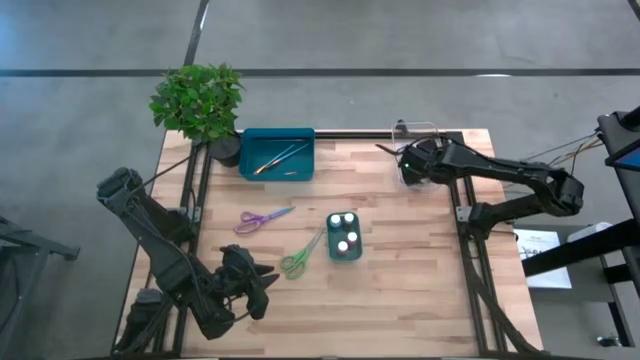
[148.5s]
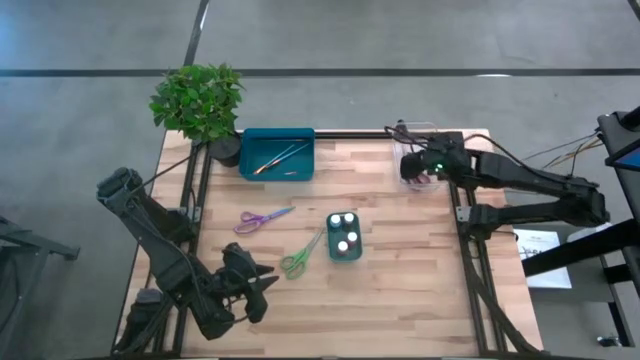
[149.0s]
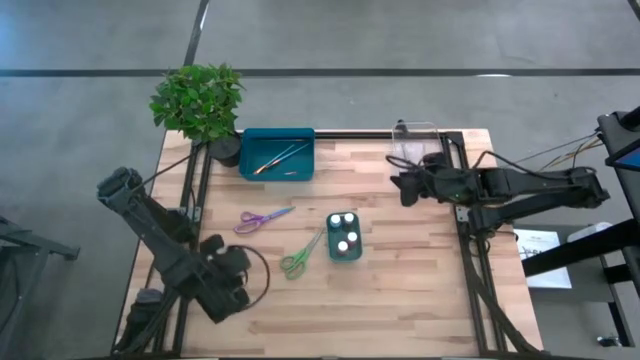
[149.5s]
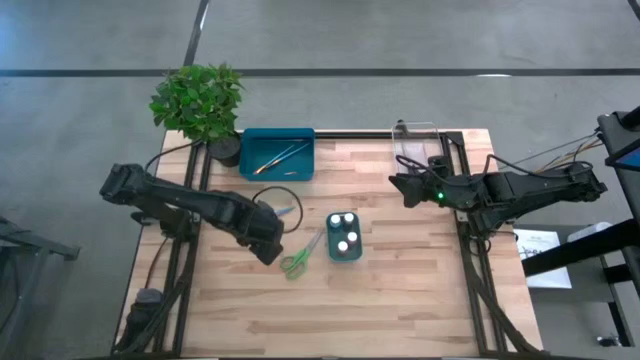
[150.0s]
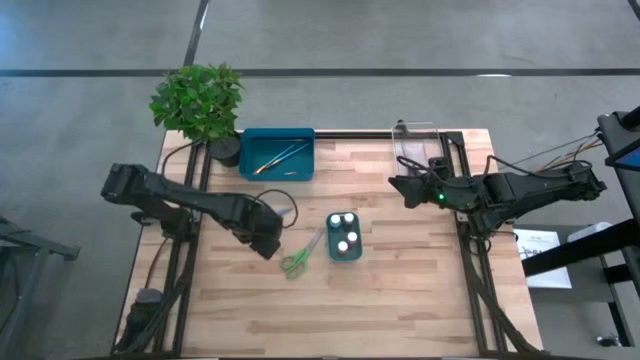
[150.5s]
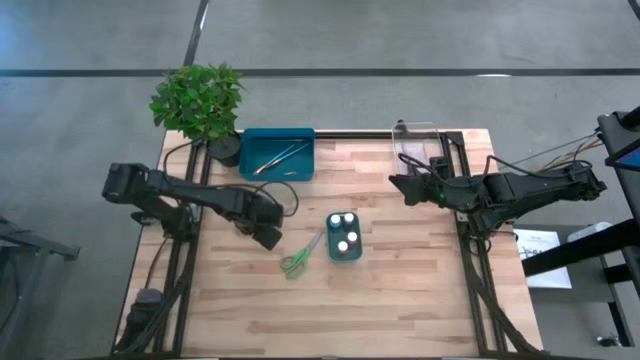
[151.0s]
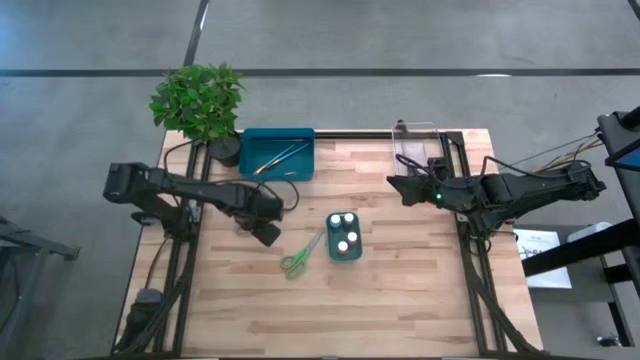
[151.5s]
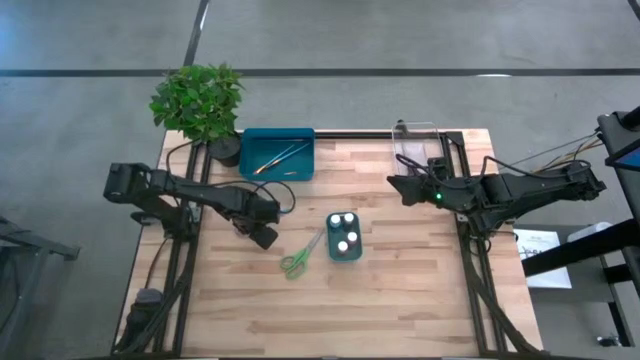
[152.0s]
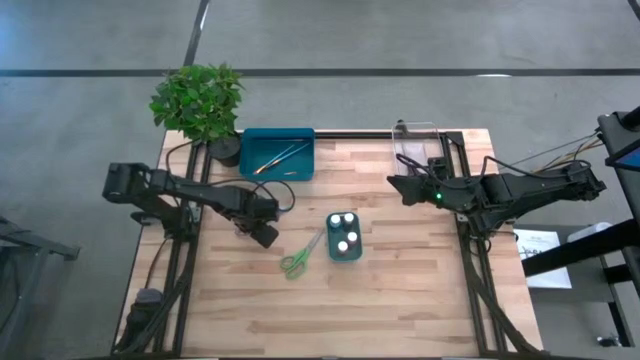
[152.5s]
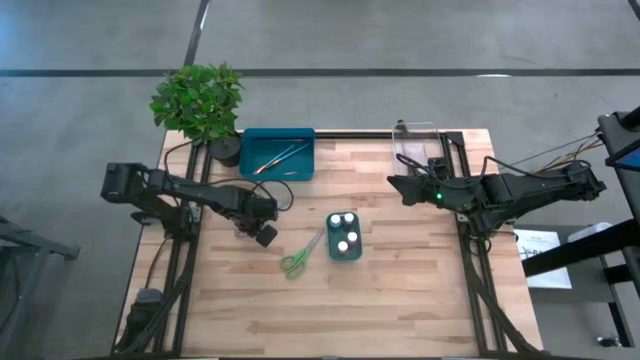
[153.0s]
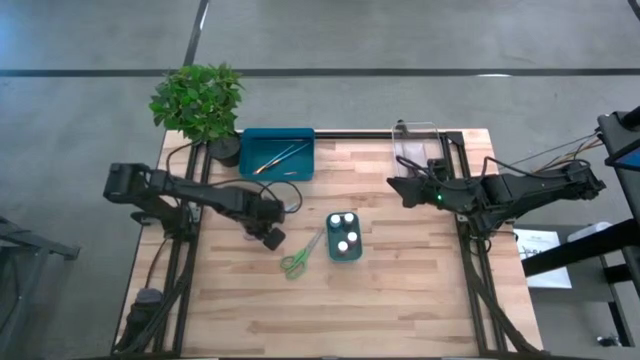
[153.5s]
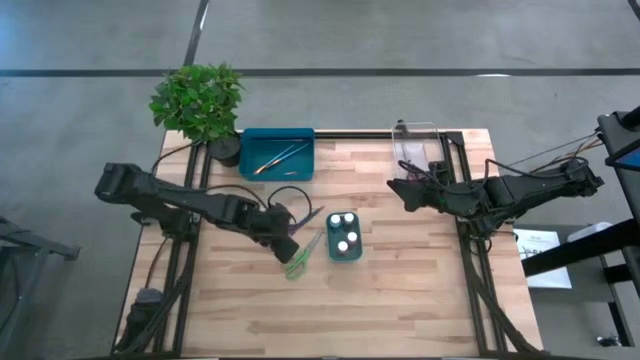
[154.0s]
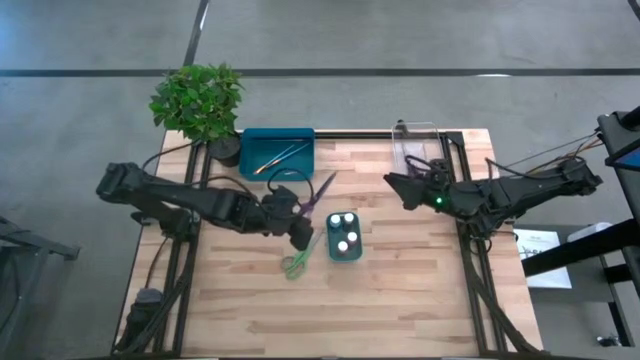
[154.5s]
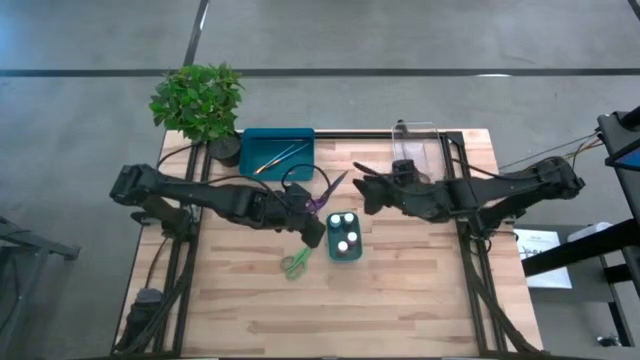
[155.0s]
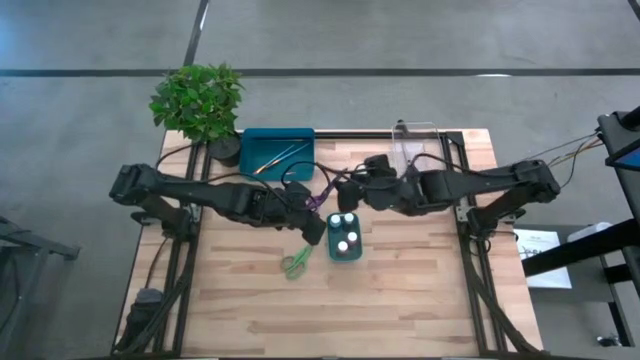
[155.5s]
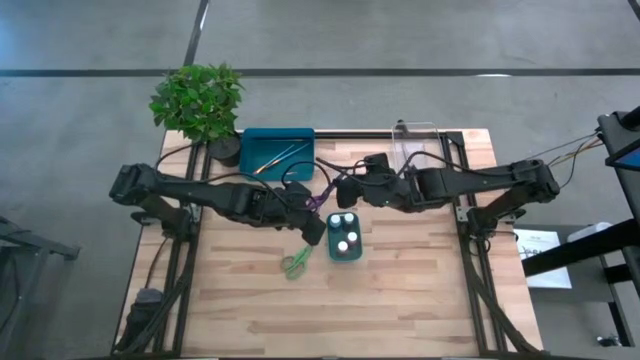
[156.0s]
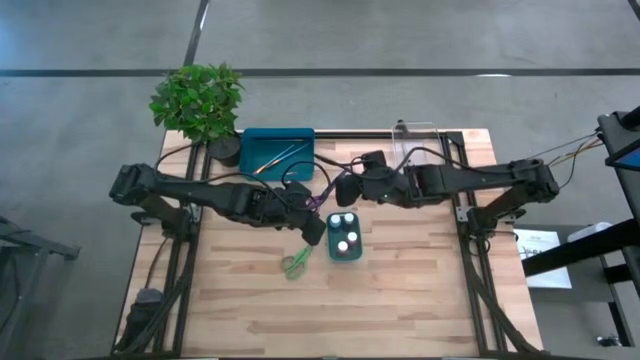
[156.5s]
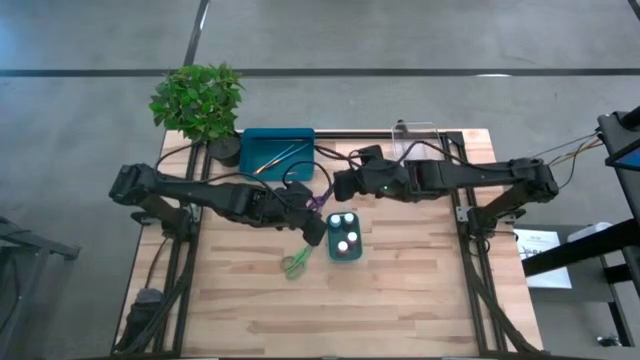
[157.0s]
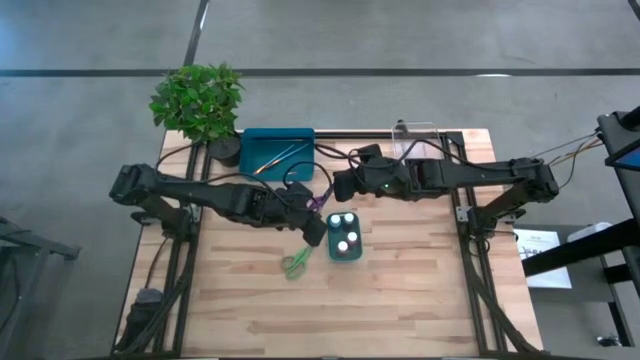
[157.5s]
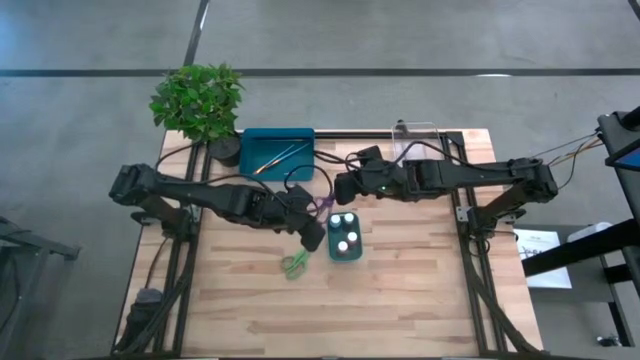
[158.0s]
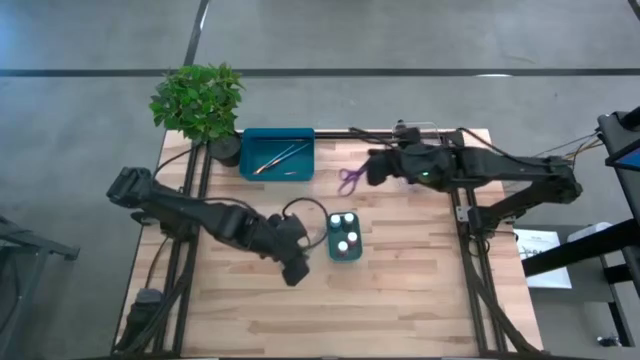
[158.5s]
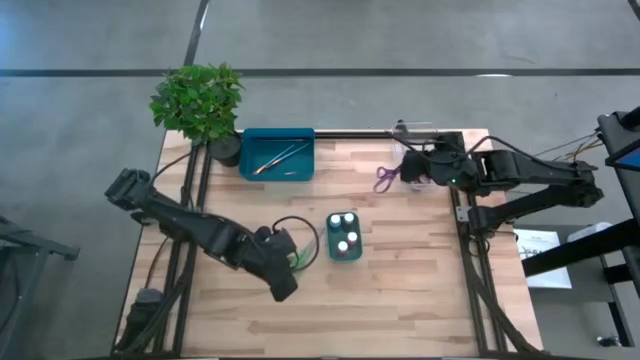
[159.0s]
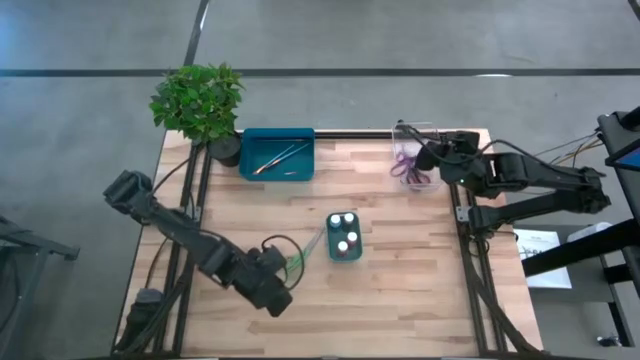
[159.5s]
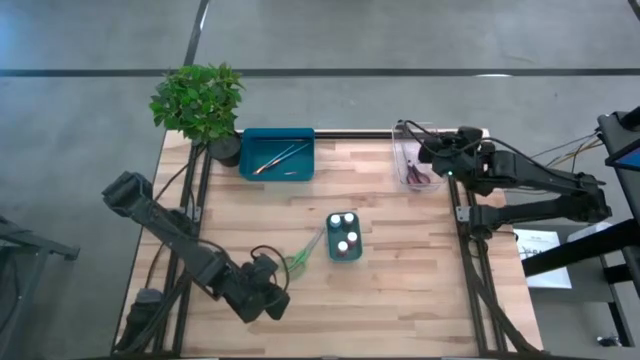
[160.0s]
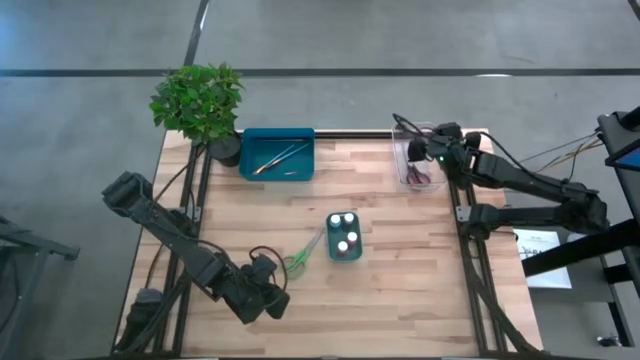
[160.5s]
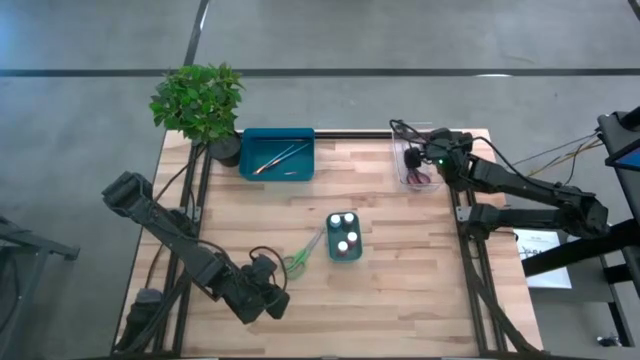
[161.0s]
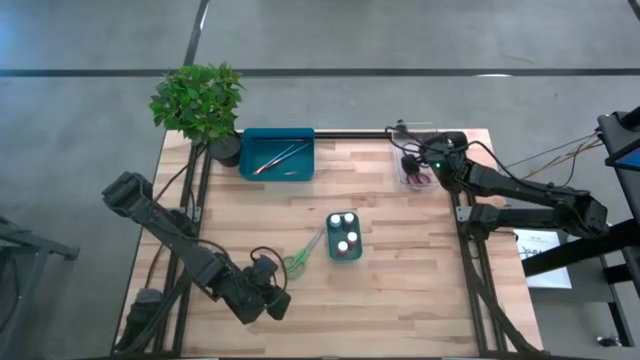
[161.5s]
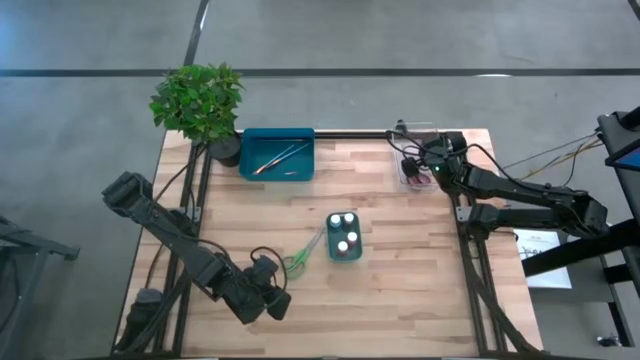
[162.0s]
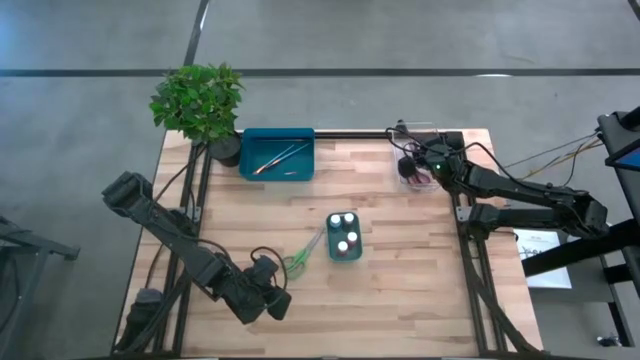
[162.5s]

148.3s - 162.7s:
Task: Pick & Place Paint Supplies
Put the left violet scissors into the transparent bin

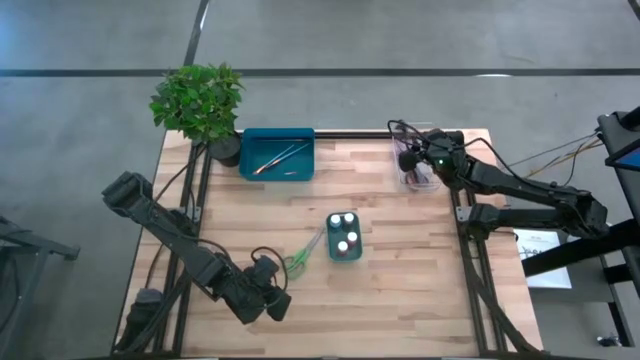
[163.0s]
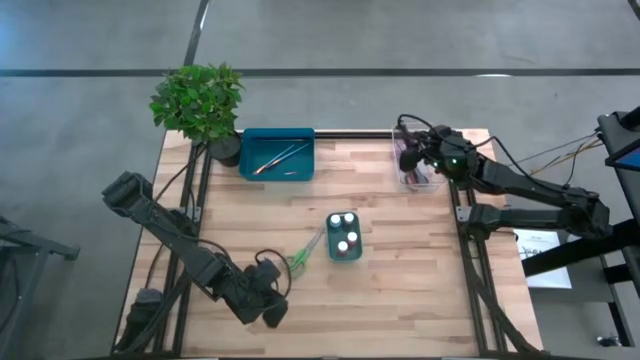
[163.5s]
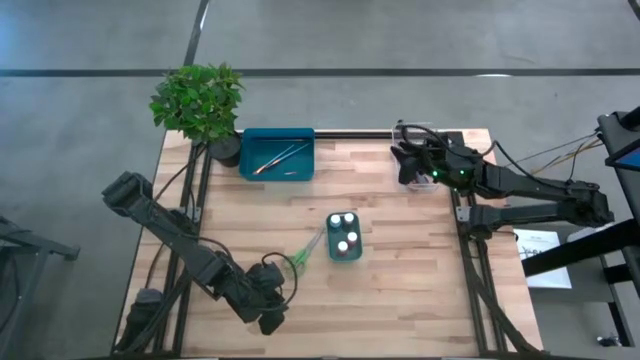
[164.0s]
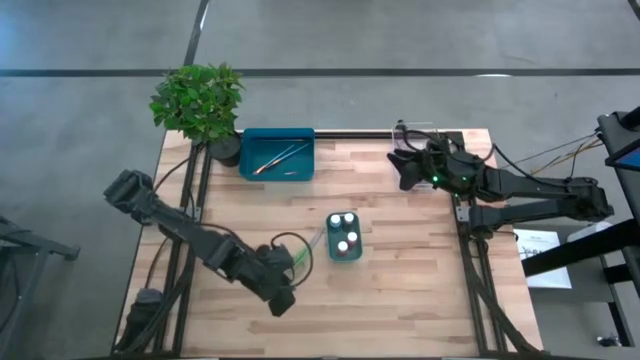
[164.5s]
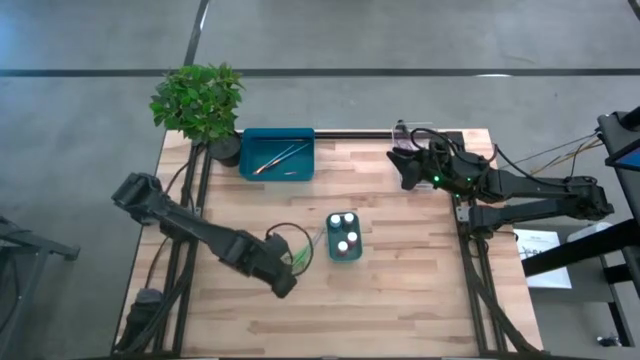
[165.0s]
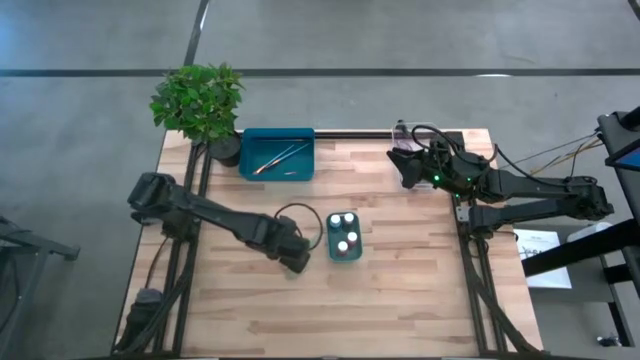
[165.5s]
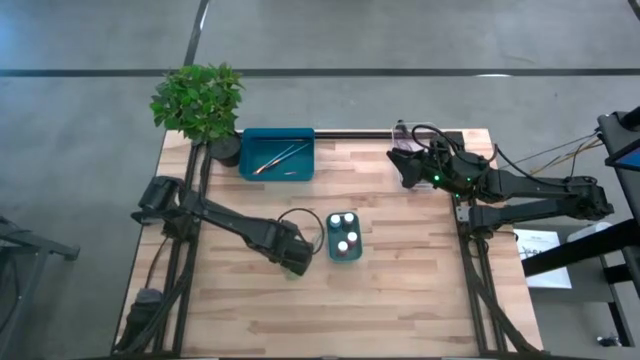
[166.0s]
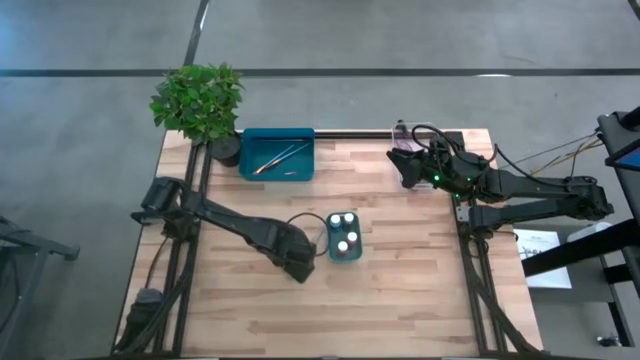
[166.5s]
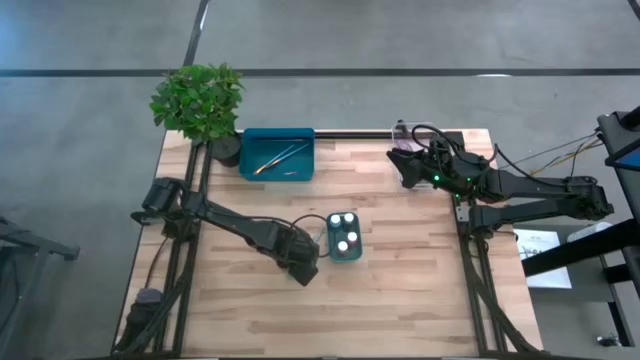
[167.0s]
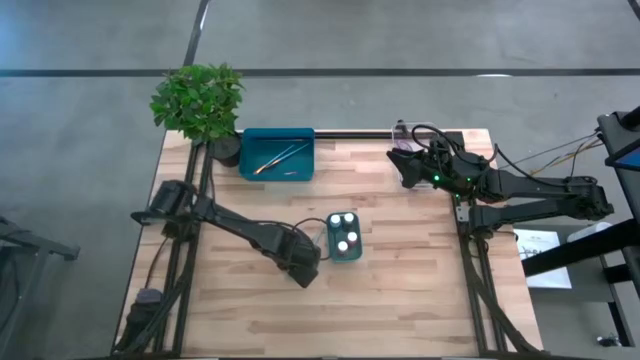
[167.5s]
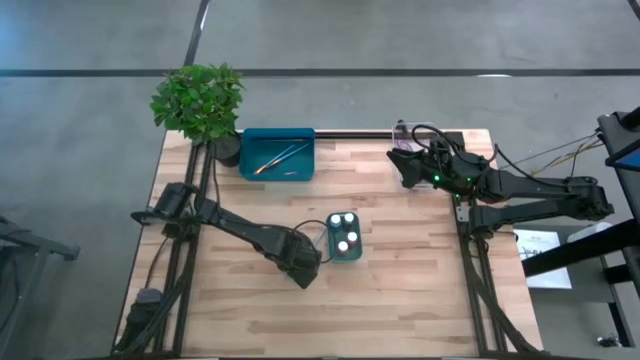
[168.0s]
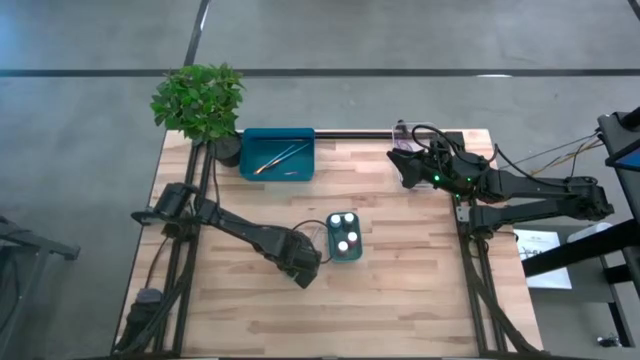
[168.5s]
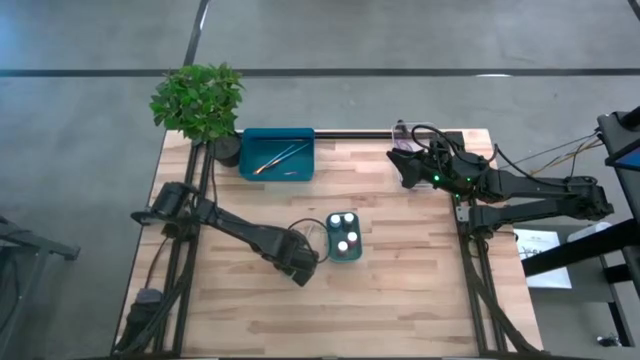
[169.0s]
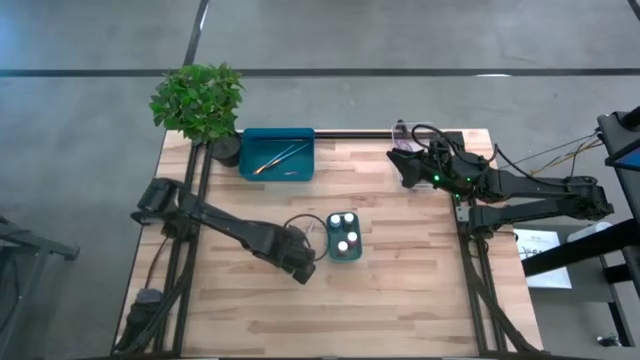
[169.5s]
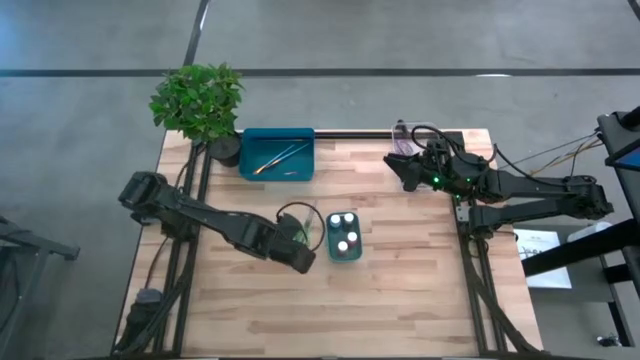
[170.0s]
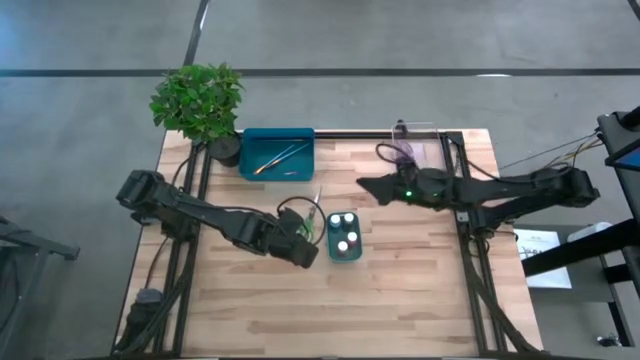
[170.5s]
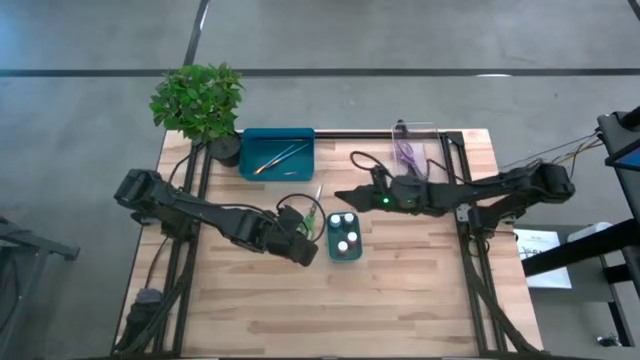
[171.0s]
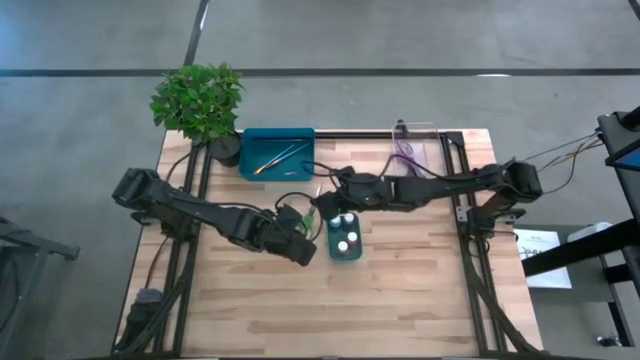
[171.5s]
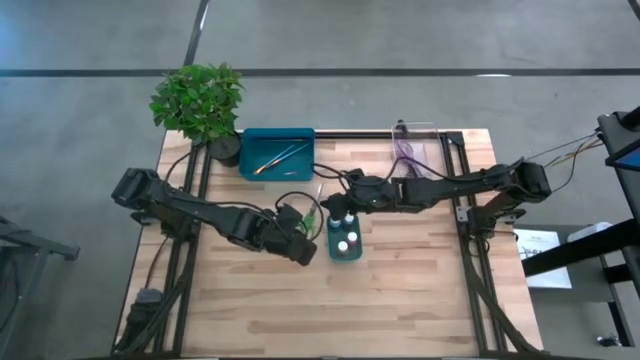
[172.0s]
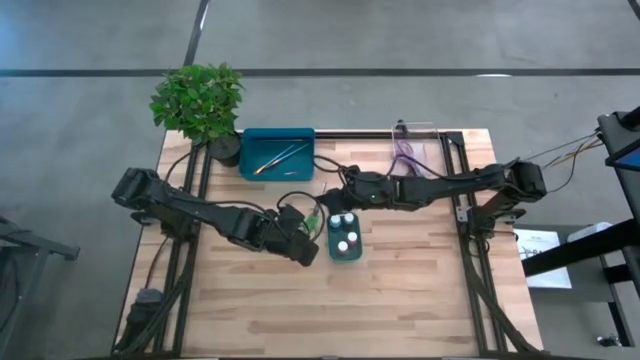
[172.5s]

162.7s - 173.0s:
Put the green scissors into the transparent bin
